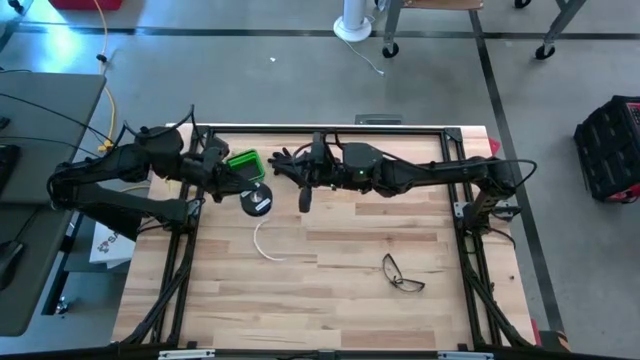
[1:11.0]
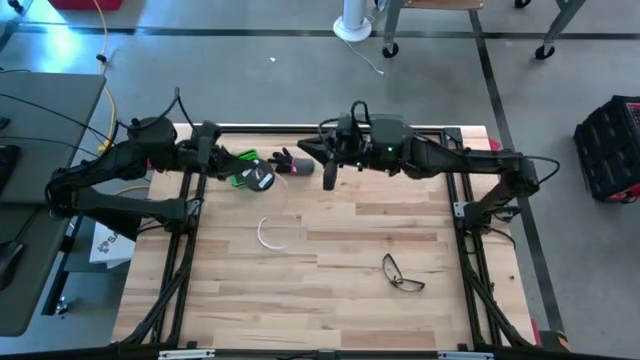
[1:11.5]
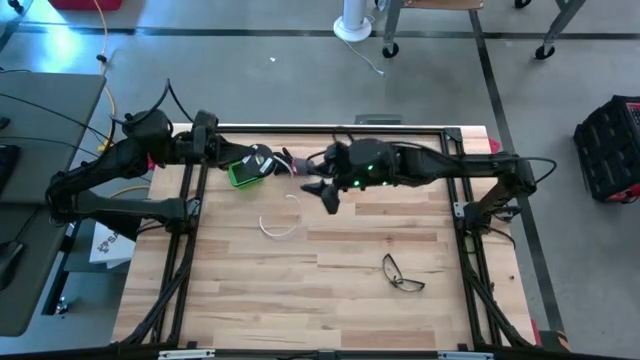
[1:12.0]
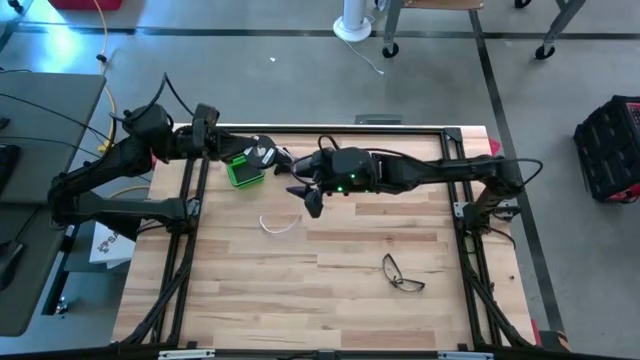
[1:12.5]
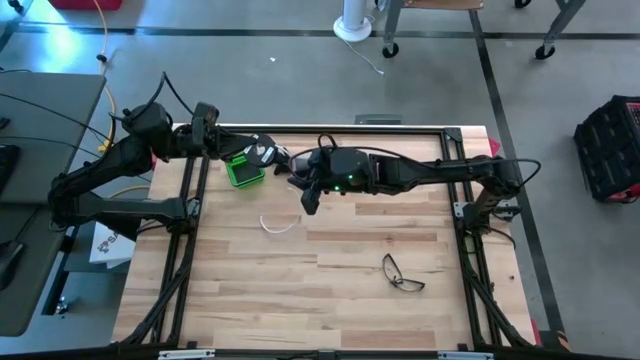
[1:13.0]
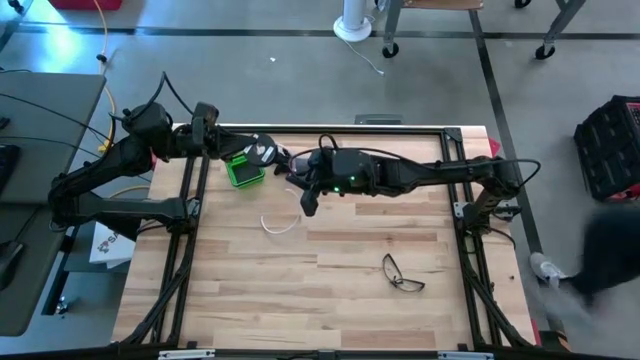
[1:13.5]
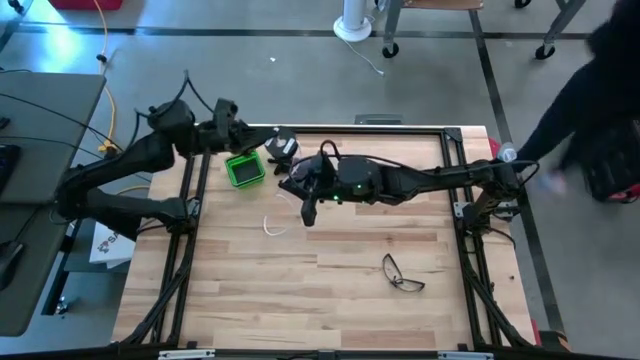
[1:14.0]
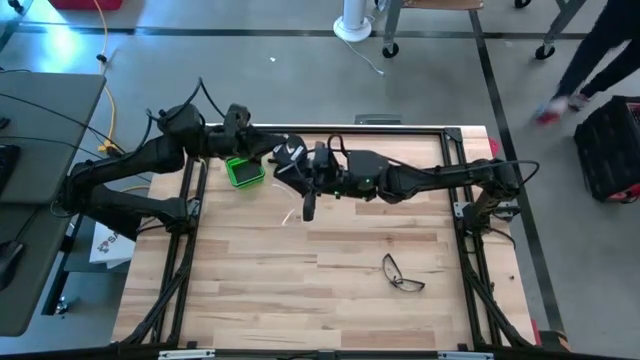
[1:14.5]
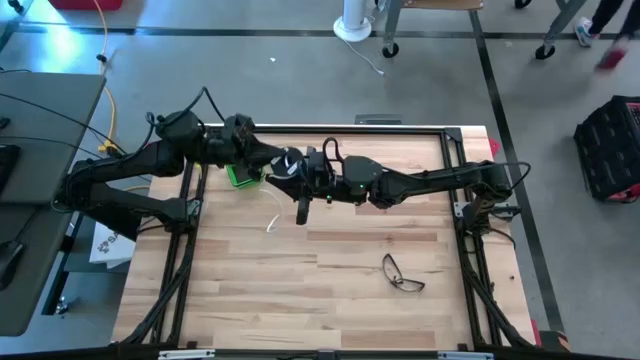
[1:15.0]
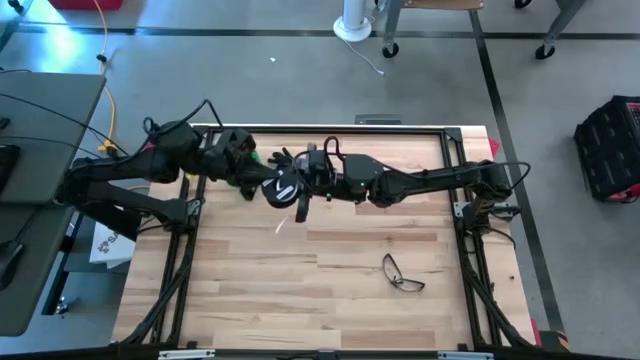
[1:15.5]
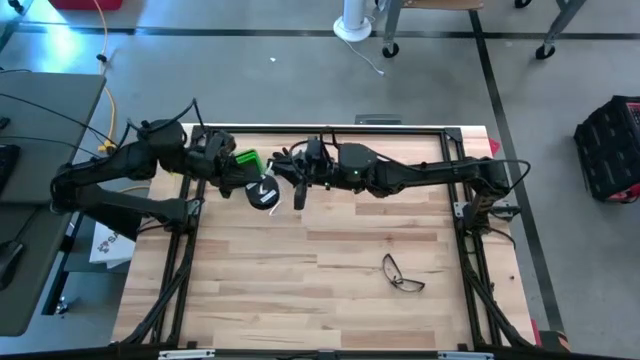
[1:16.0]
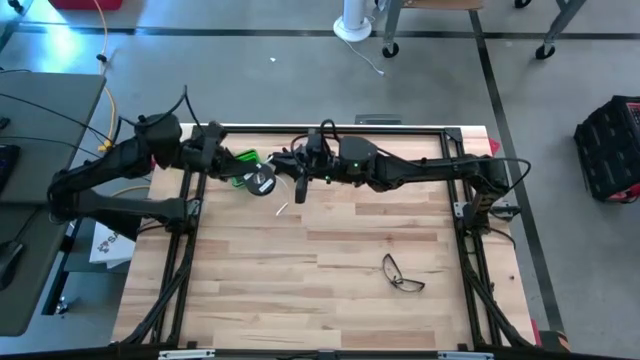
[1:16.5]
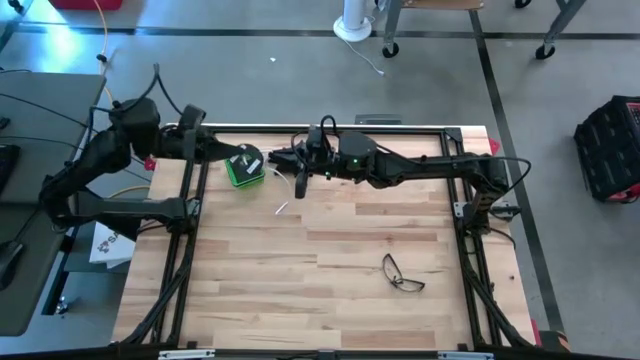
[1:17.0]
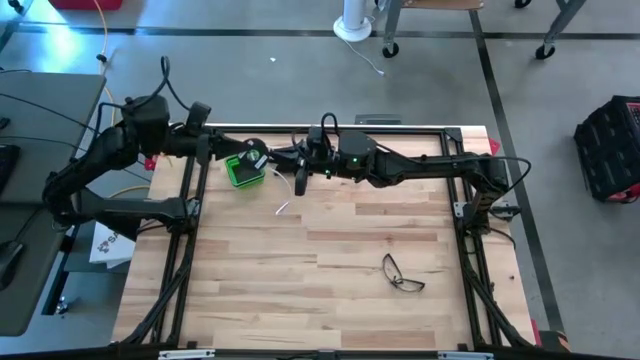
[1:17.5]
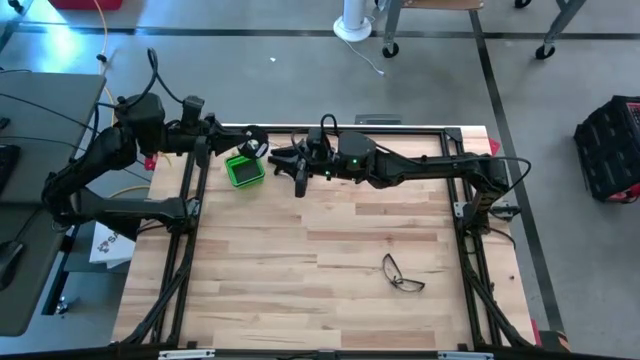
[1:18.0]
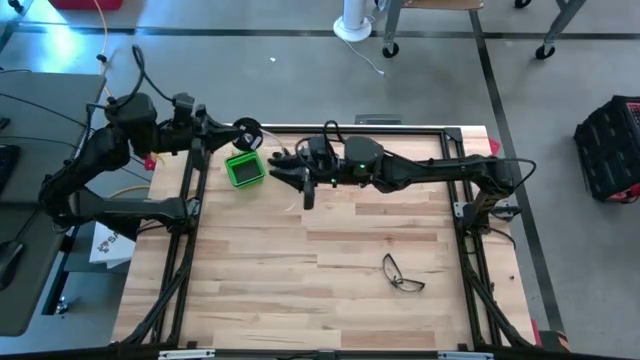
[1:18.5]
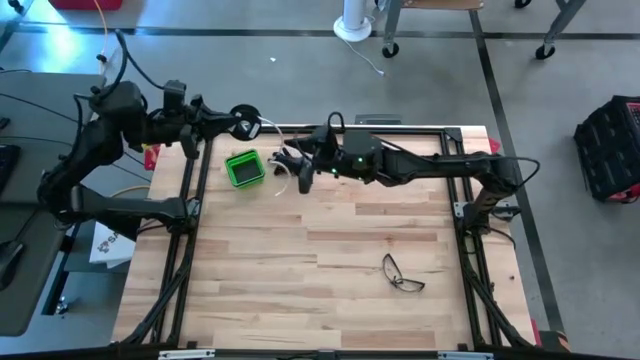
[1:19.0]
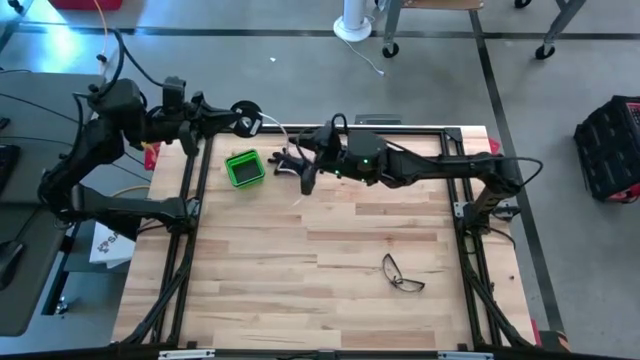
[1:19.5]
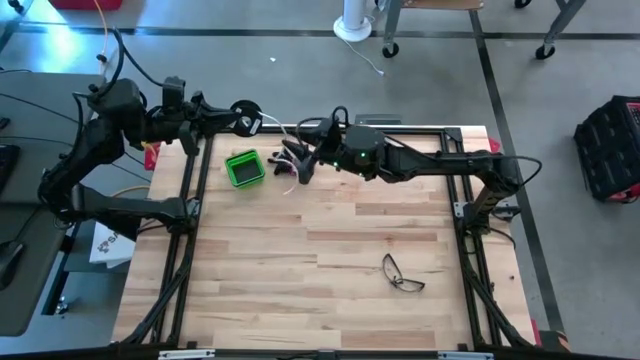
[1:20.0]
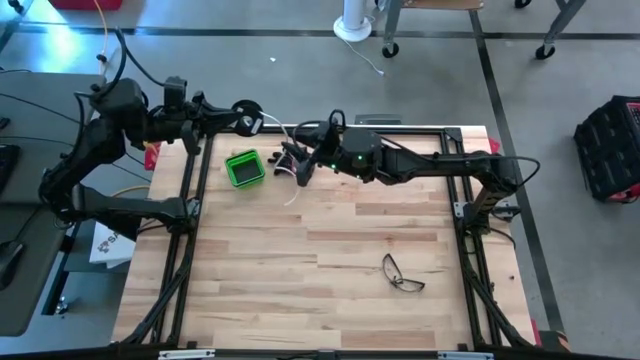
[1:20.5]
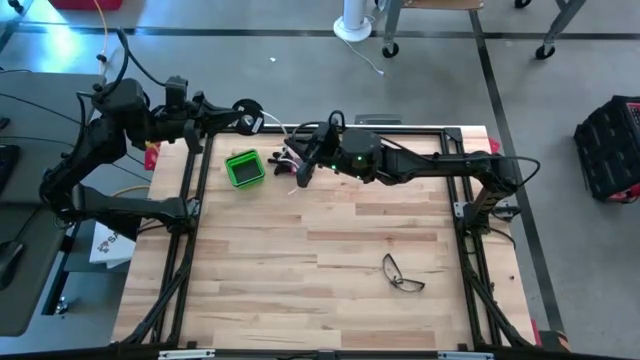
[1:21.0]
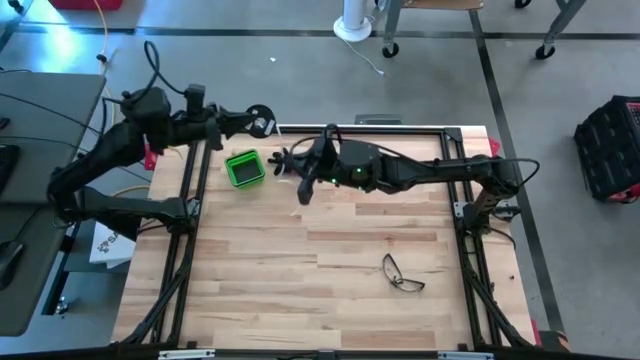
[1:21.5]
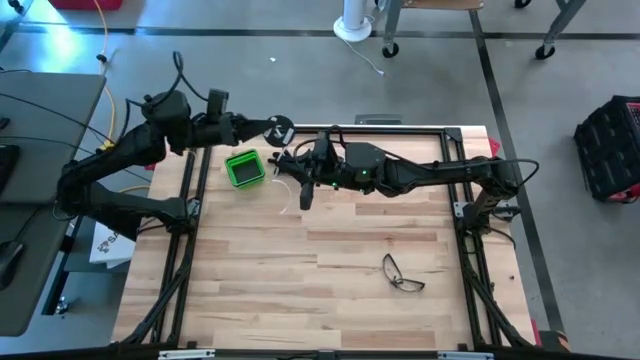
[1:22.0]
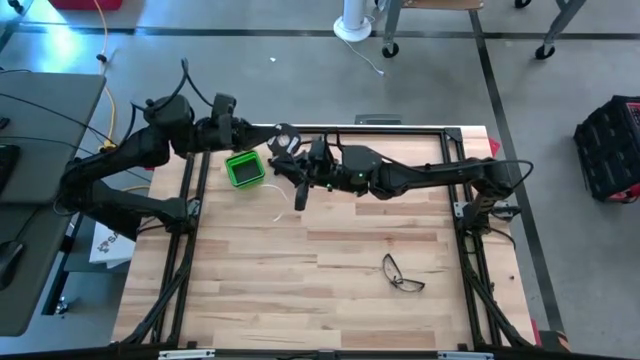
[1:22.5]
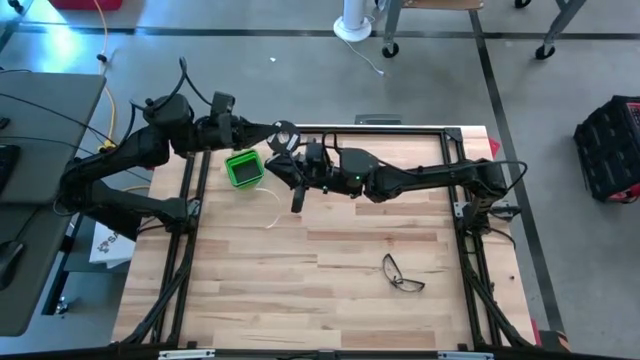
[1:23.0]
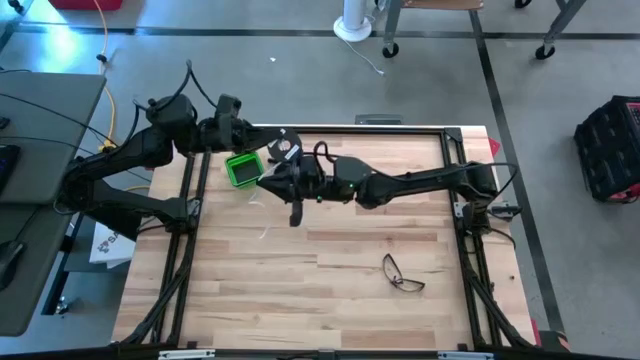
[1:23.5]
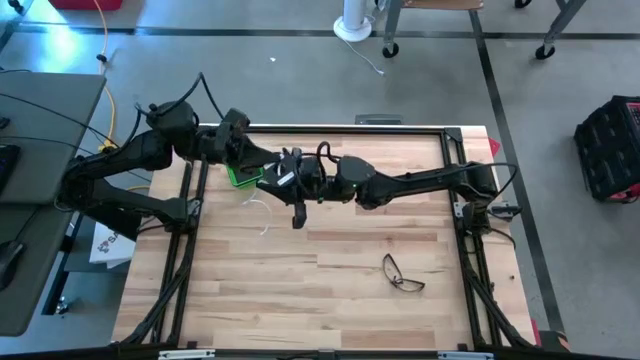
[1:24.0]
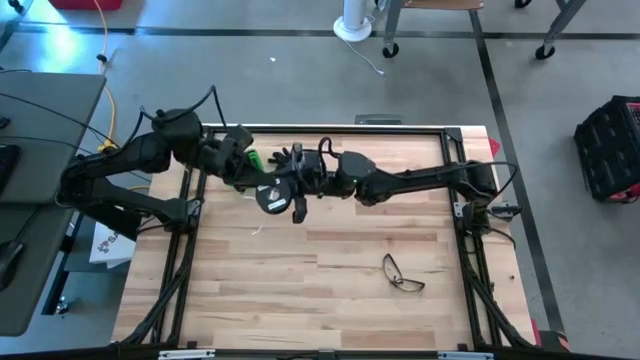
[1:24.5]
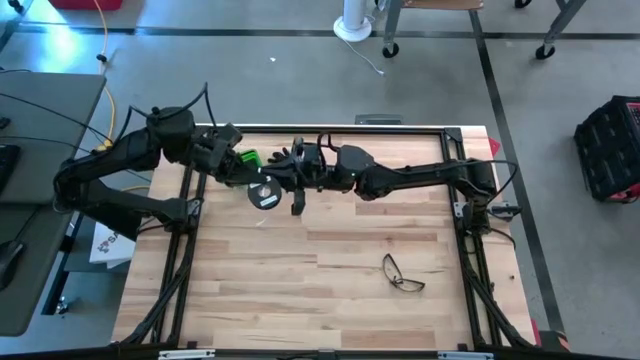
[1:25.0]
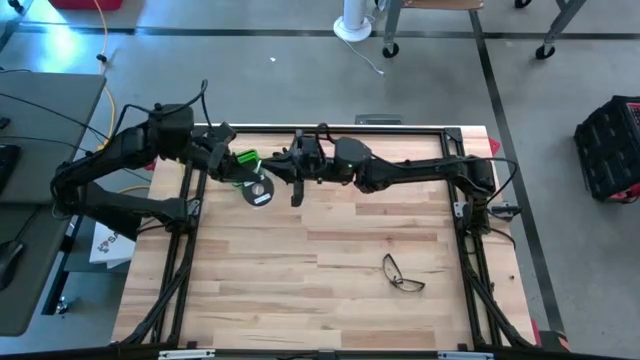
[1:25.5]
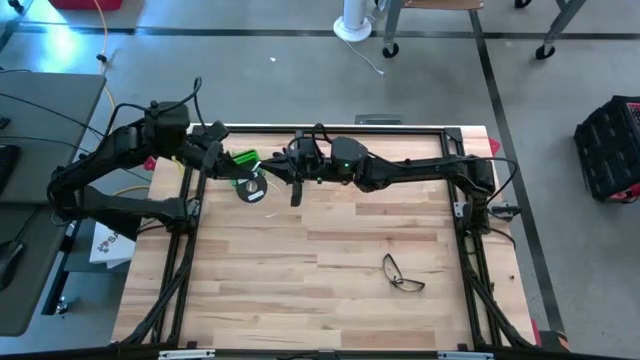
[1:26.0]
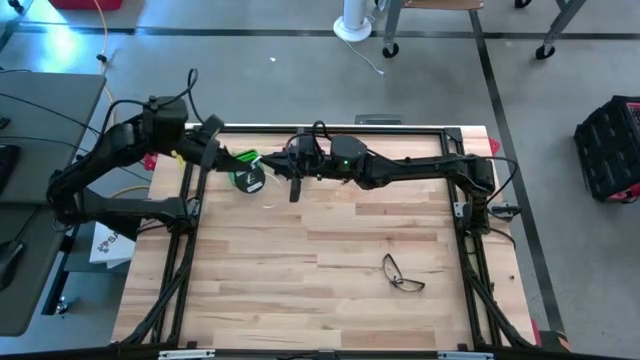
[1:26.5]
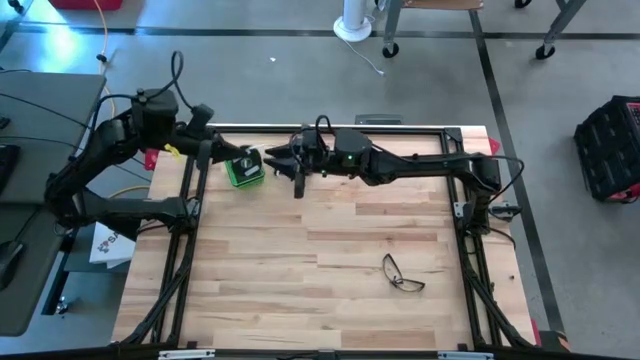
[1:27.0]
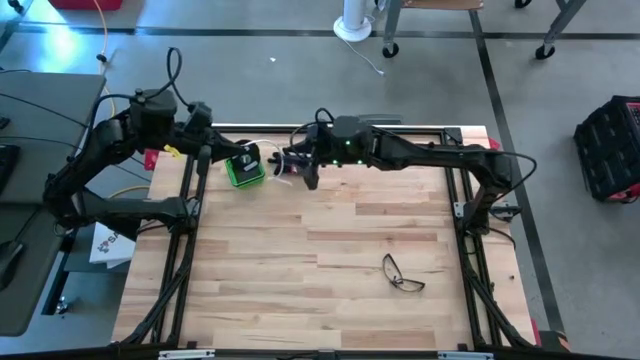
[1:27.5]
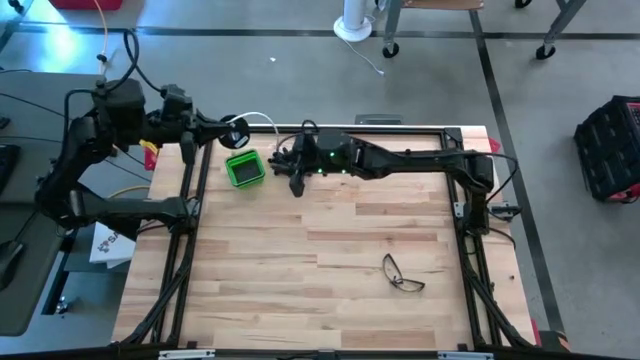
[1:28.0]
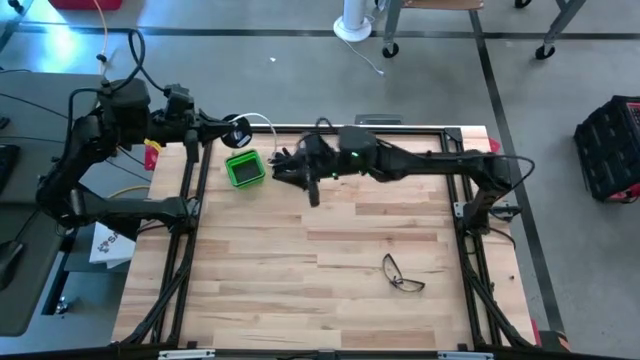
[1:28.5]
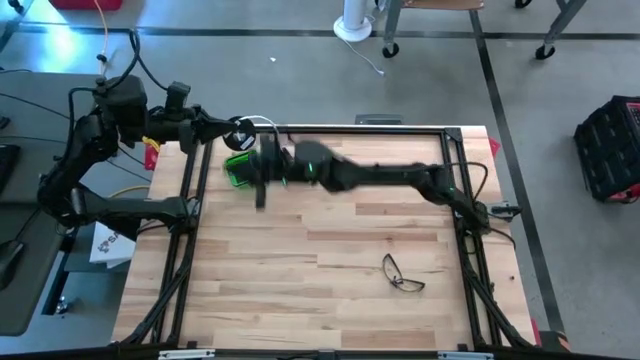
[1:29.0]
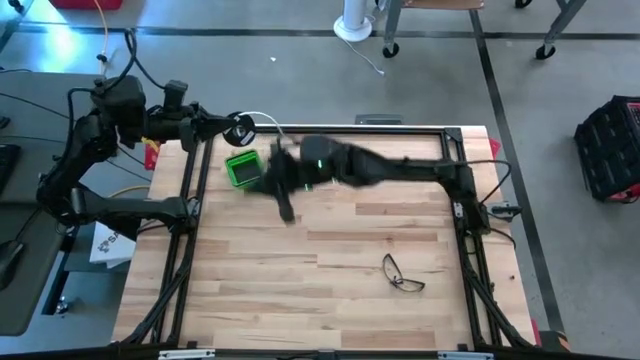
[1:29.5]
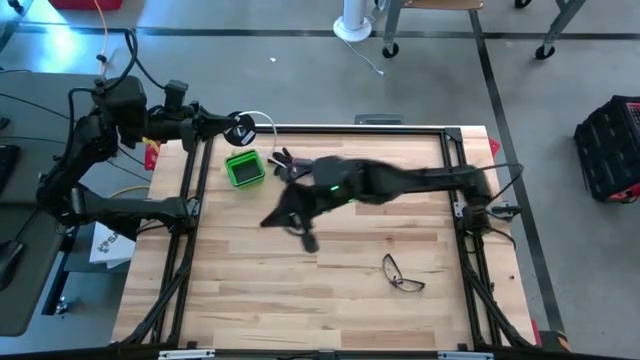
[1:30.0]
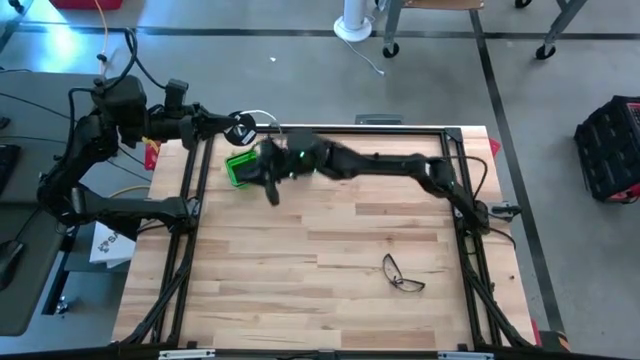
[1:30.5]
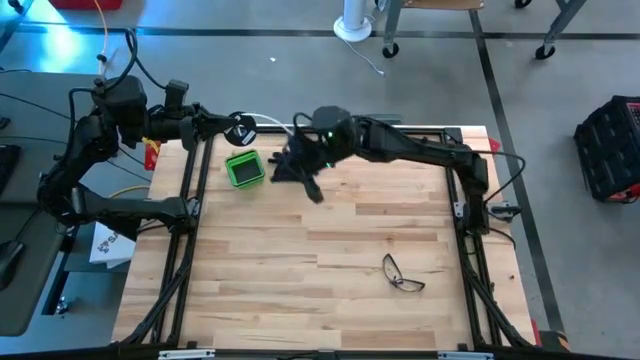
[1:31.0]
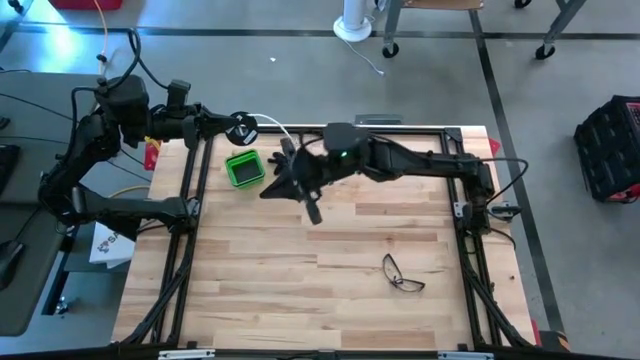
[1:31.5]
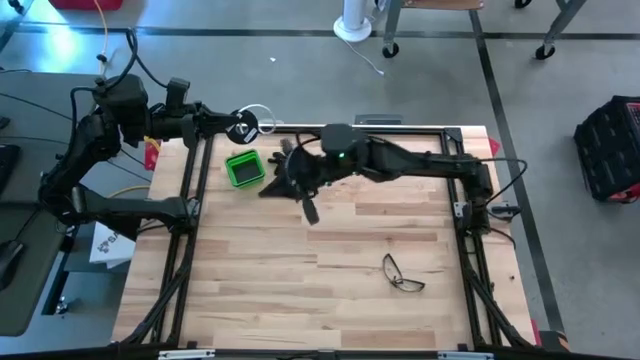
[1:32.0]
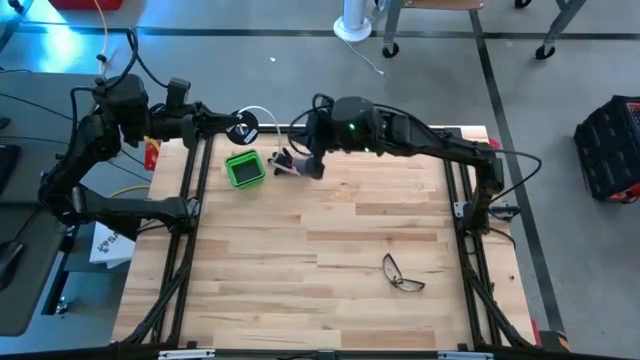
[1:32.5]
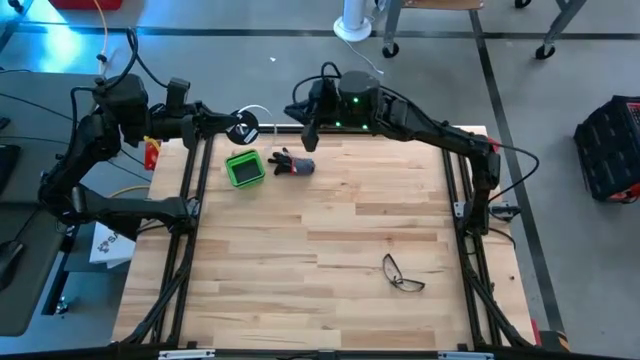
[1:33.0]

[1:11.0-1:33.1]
Task: Coil cords
Coil the white wire on the spool
